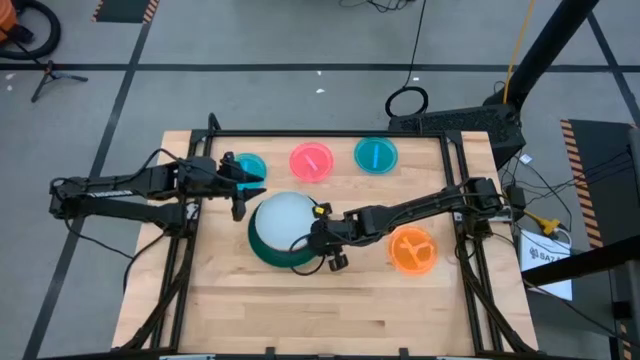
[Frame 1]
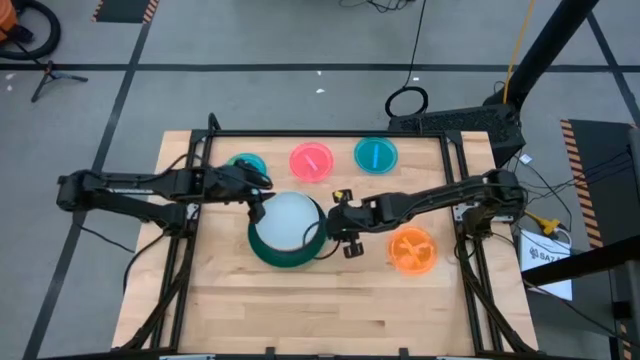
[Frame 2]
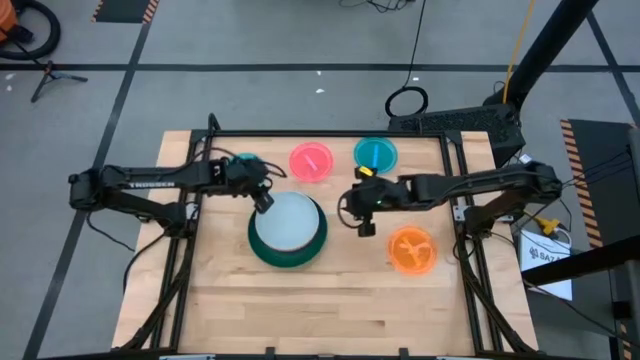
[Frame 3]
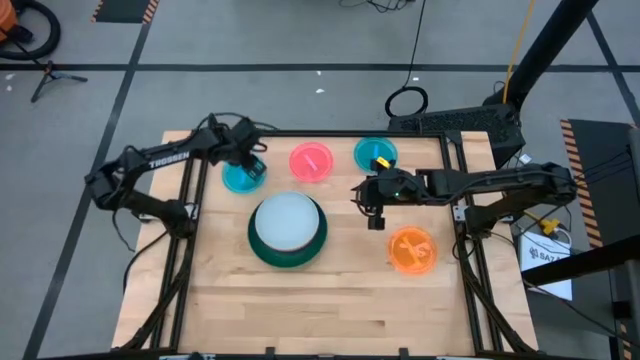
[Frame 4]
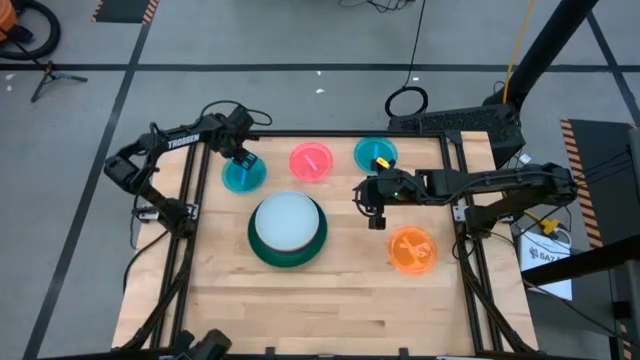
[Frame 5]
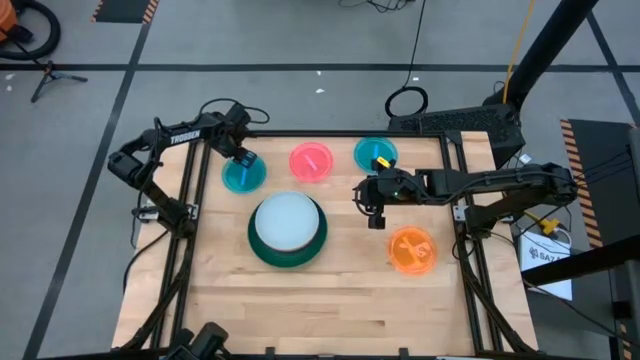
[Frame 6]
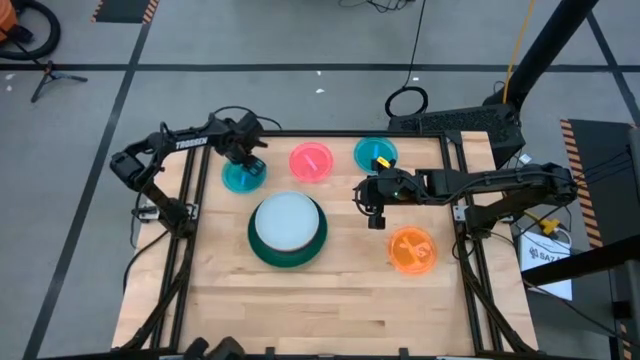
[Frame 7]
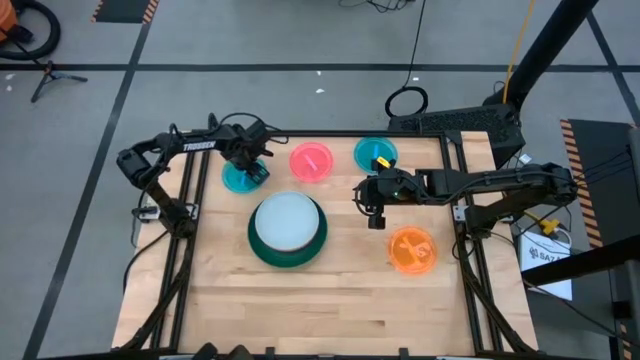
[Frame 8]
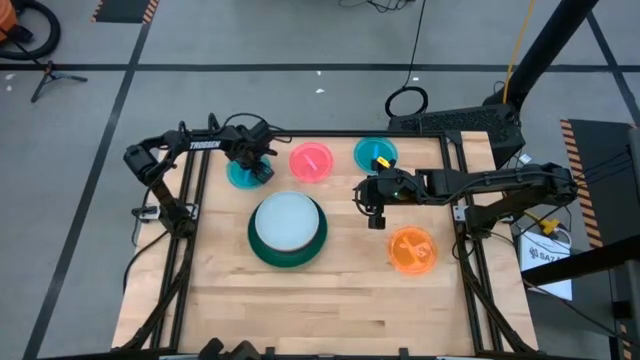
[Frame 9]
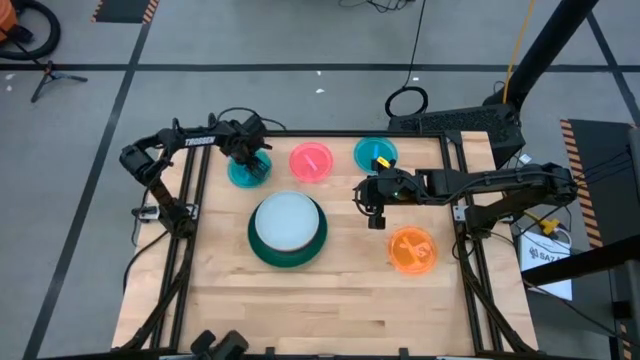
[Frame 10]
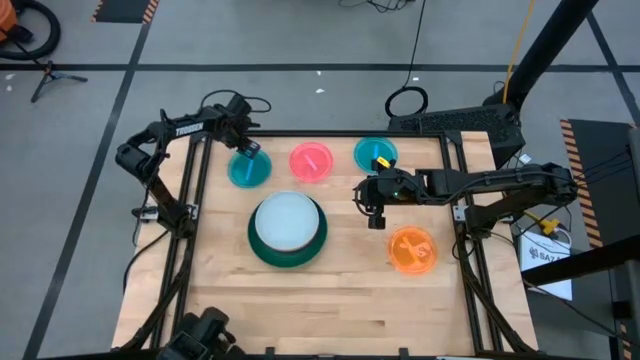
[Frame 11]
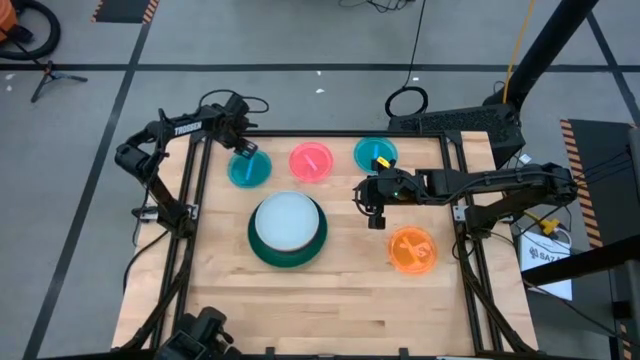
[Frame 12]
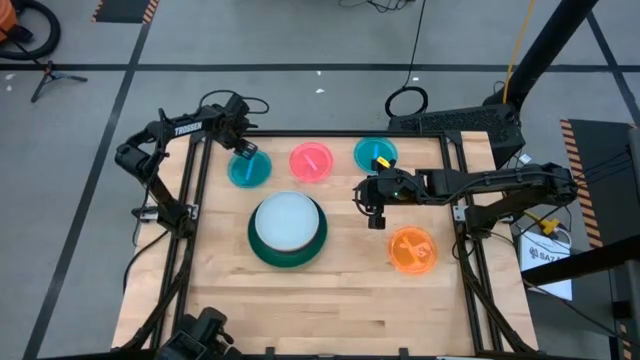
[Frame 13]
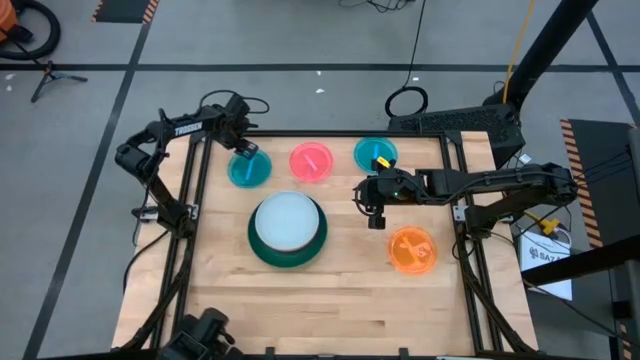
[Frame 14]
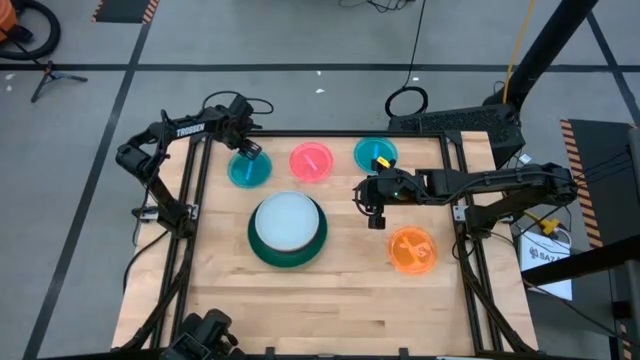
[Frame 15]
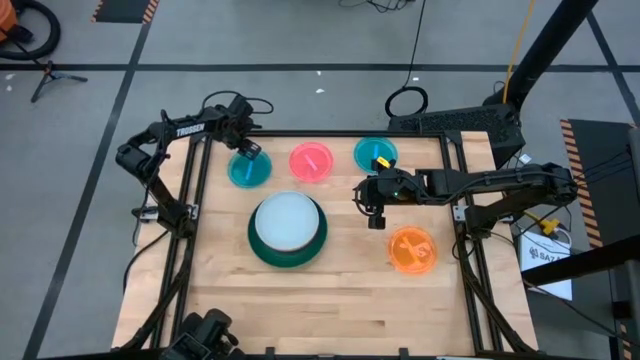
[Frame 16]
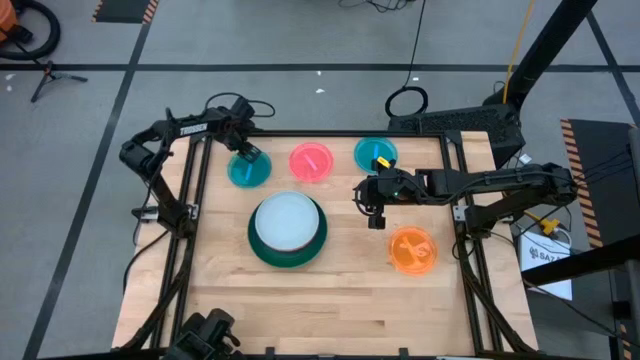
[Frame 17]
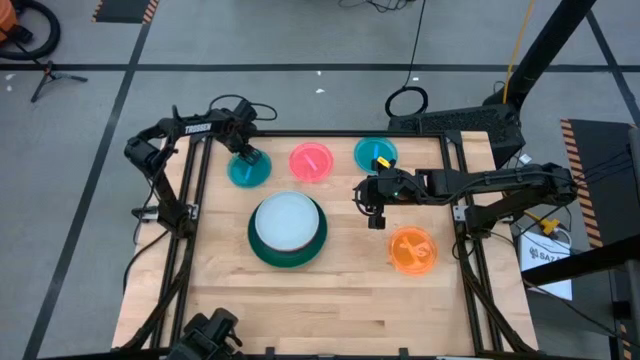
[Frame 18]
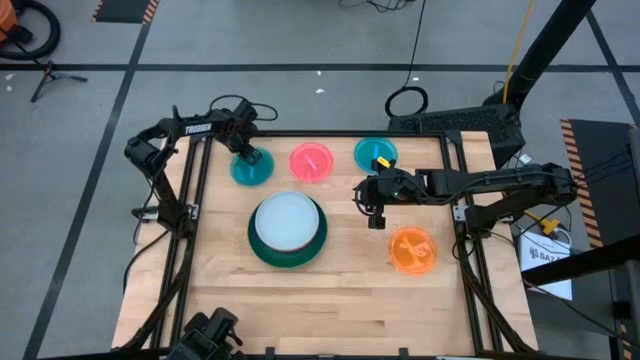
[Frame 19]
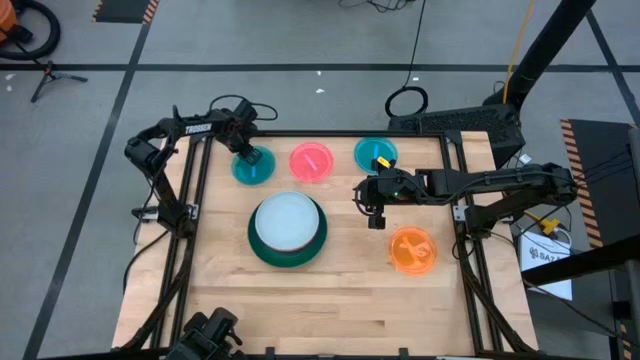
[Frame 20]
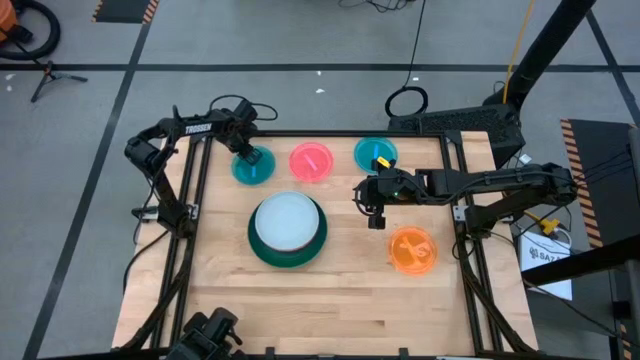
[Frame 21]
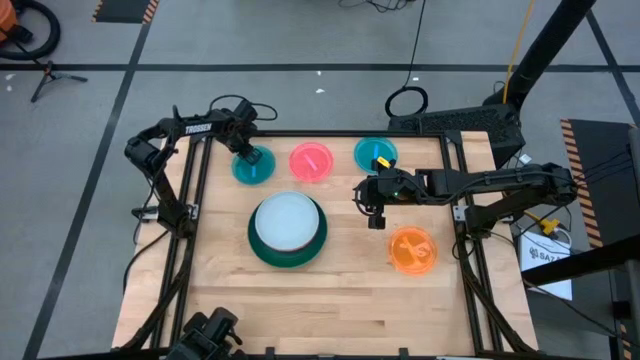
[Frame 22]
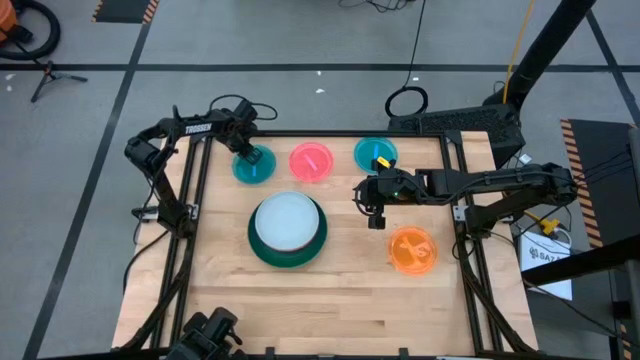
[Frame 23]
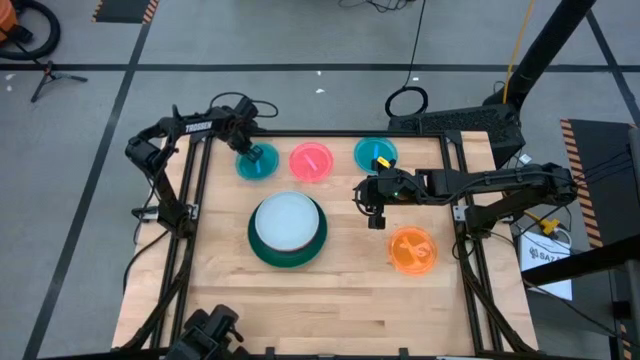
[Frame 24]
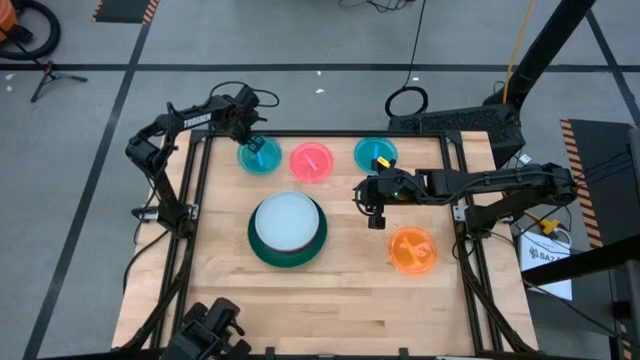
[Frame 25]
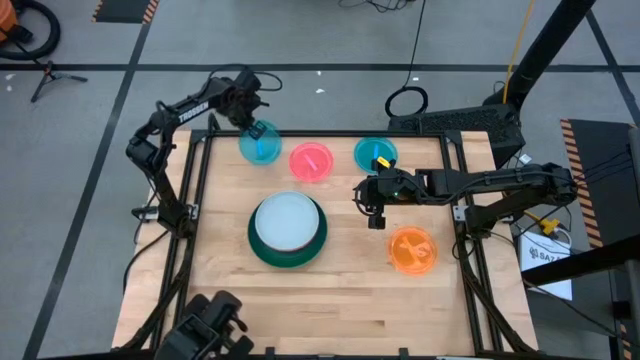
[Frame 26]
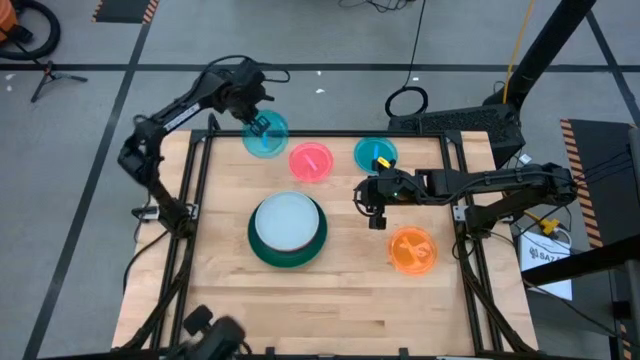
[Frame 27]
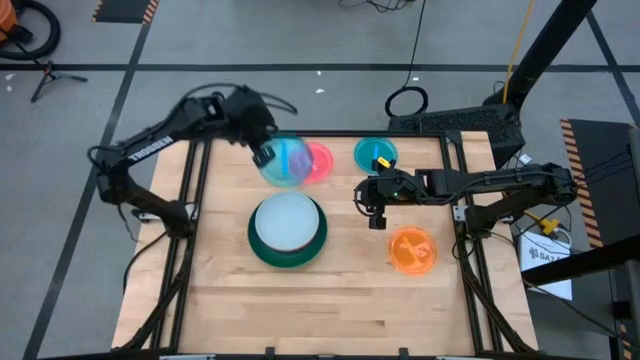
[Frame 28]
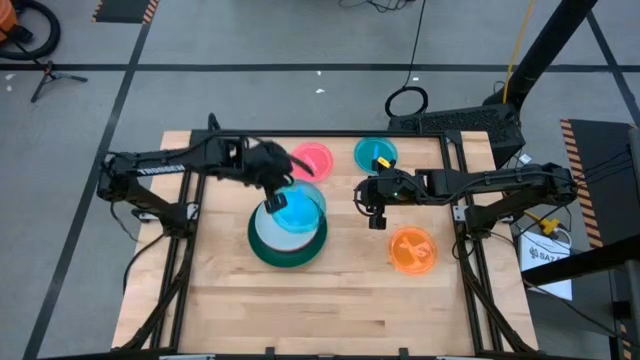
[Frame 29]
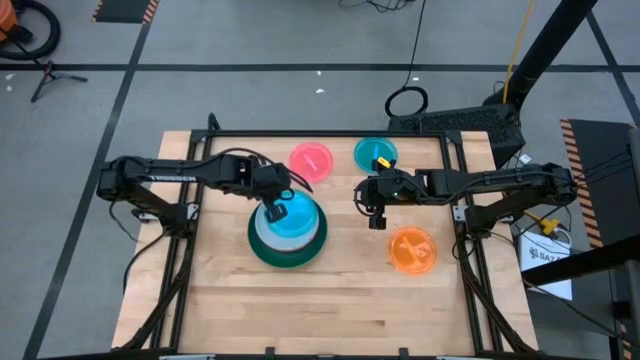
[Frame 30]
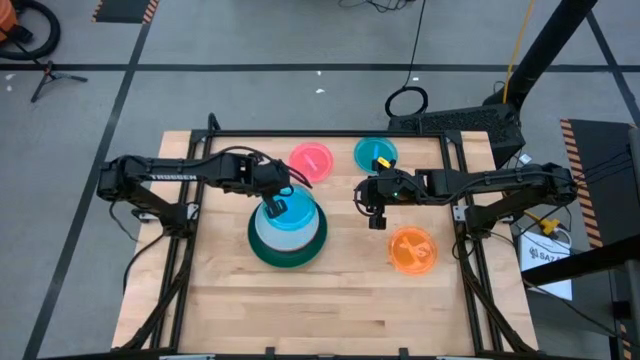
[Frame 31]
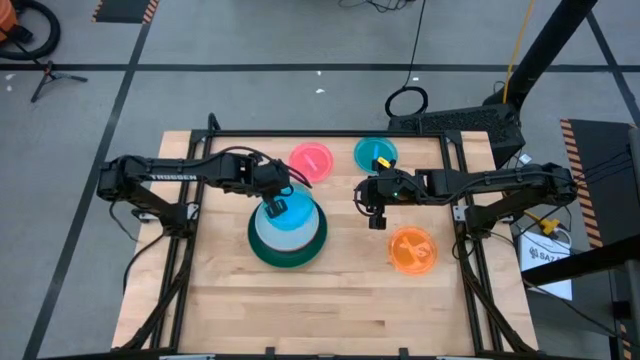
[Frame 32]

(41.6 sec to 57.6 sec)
Task: Stack plastic plates
Stack the left light blue plate on top of the blue plate

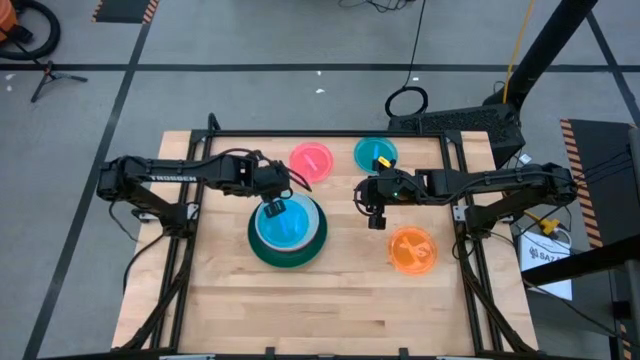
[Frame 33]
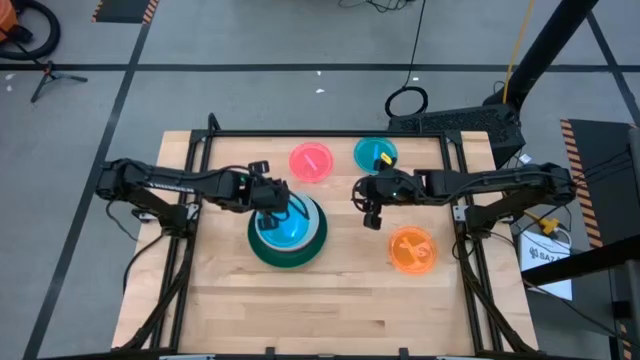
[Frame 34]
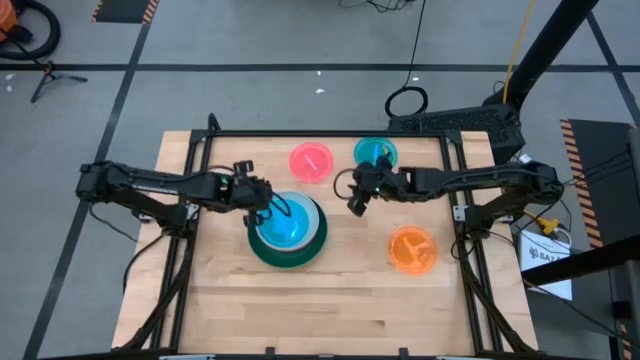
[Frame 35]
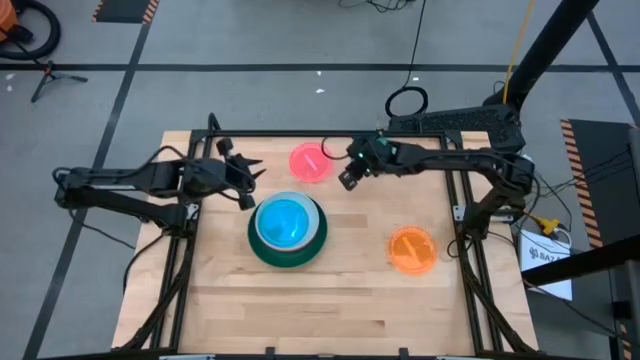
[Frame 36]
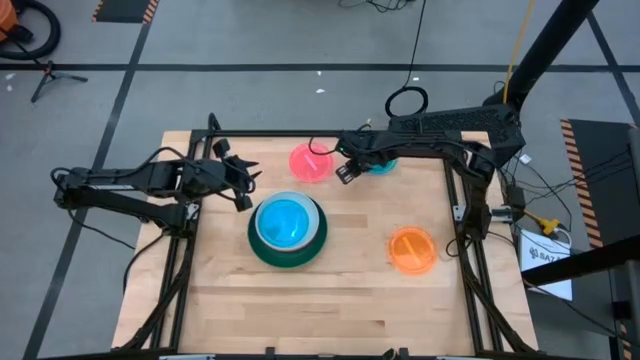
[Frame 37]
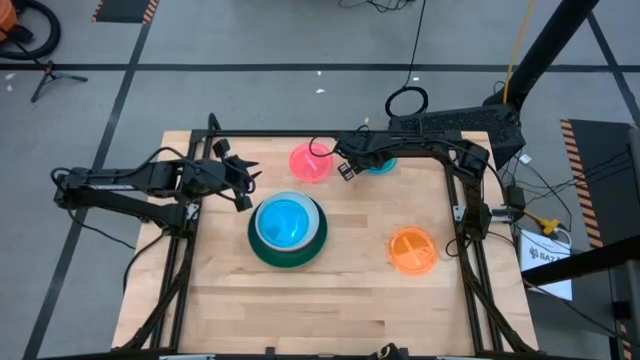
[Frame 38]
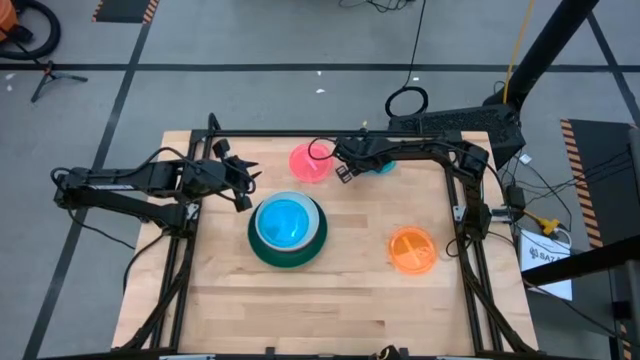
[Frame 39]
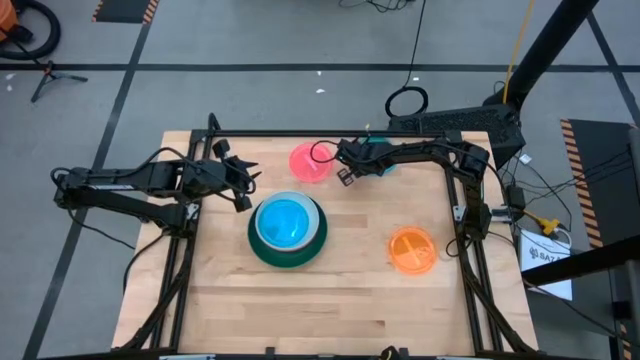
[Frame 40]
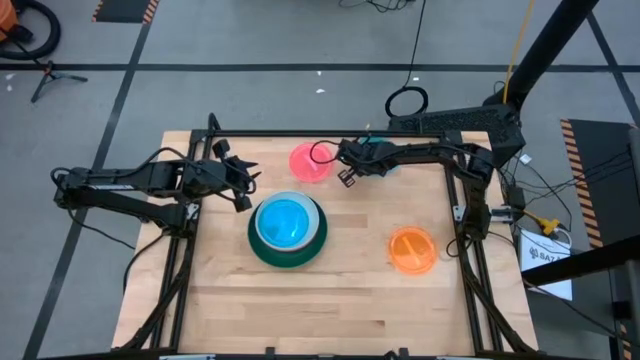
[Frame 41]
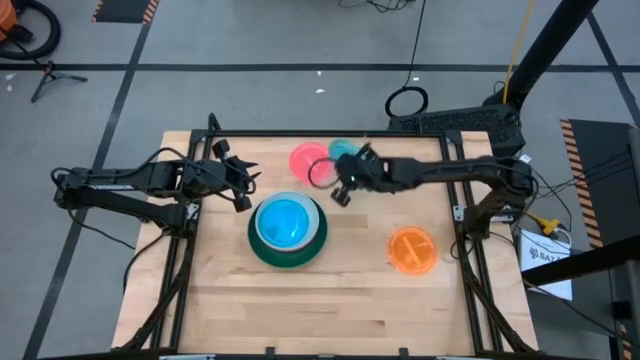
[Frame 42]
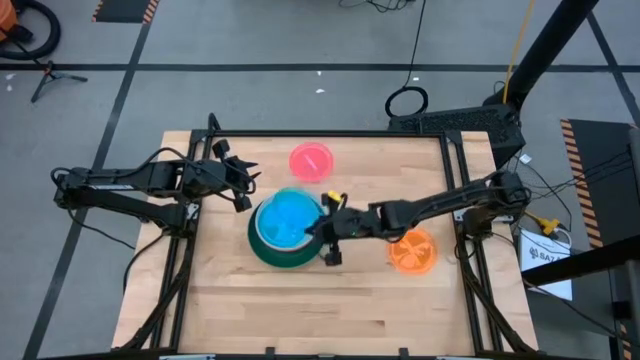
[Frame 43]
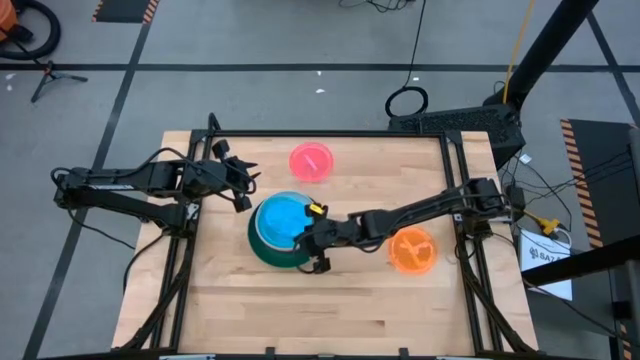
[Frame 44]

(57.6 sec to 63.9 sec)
Stack the light blue plate on top of the light blue plate
